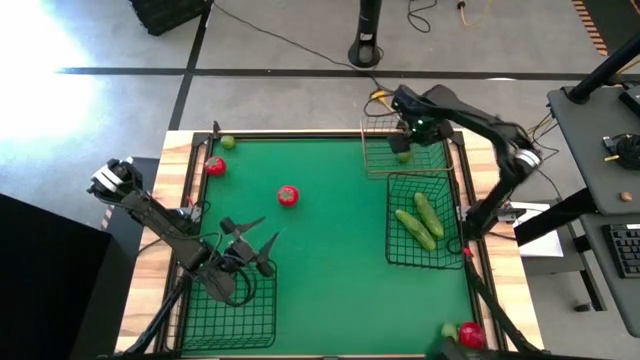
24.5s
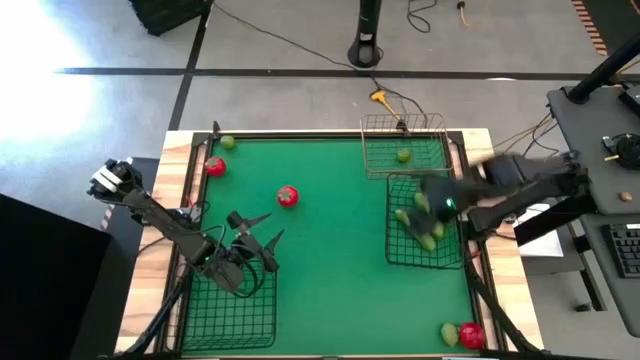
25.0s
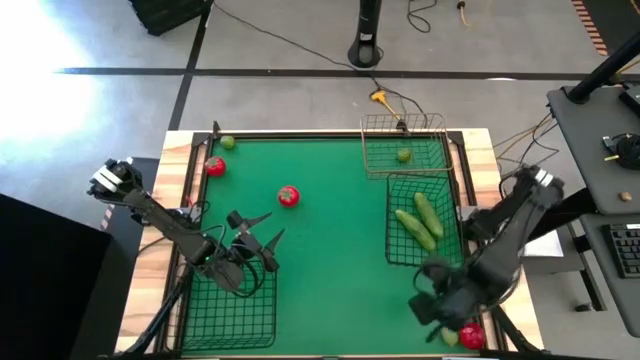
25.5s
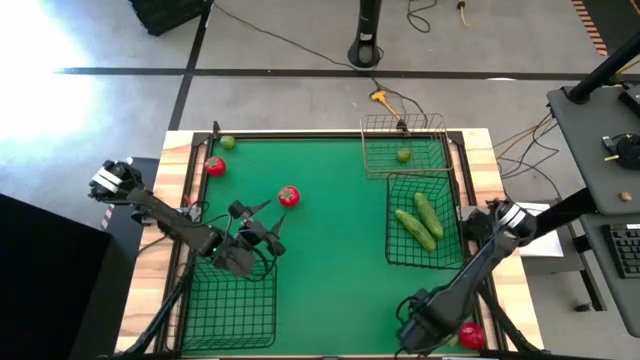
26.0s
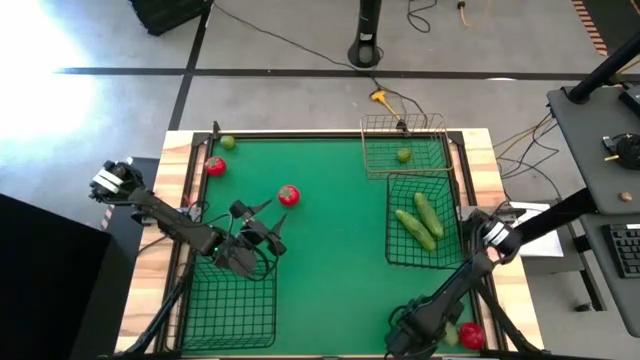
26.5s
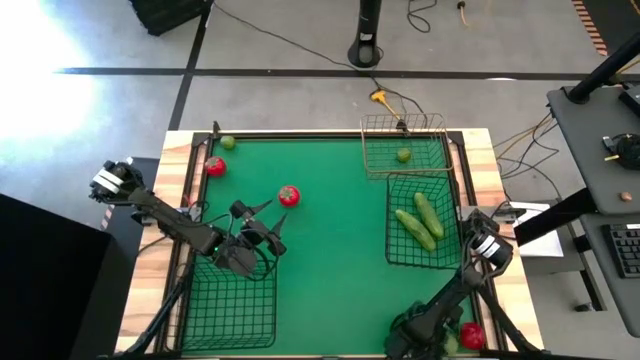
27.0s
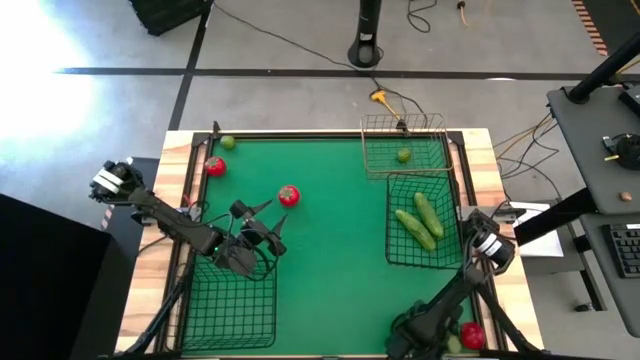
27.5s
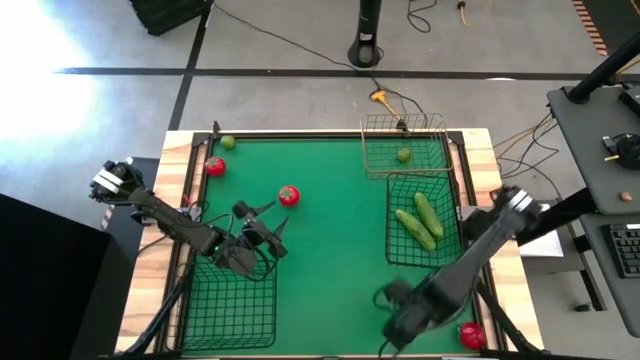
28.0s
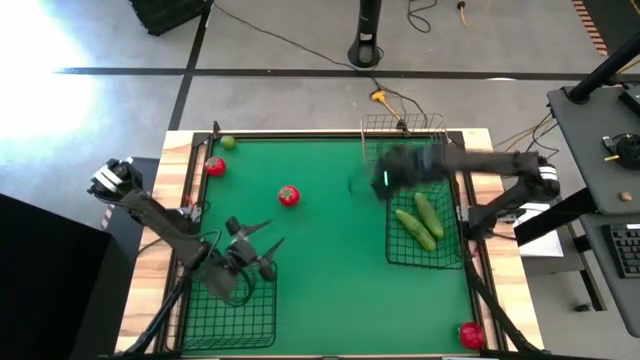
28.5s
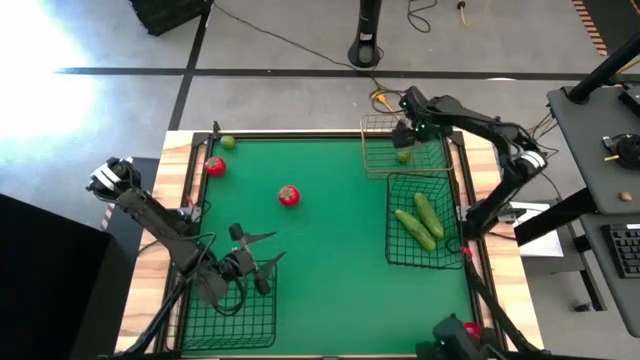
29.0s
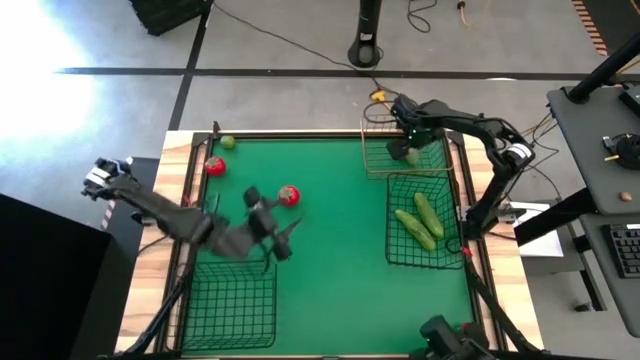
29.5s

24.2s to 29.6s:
Task: Sort produce into baskets
Put the bottom lime into the gold wire basket

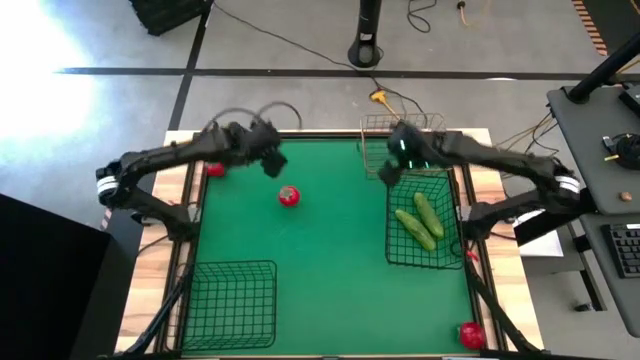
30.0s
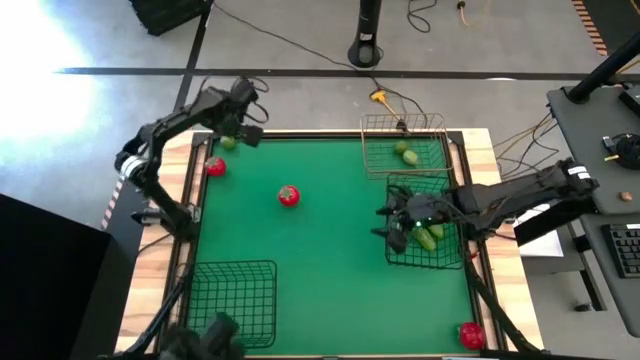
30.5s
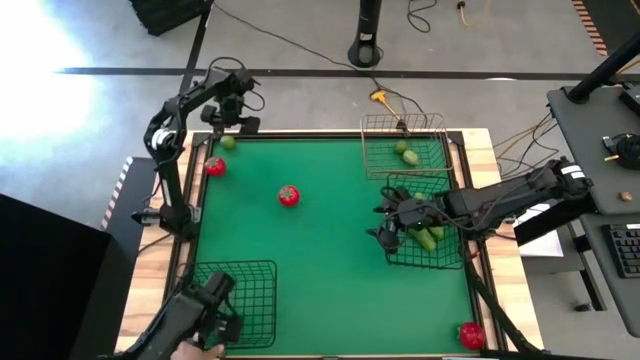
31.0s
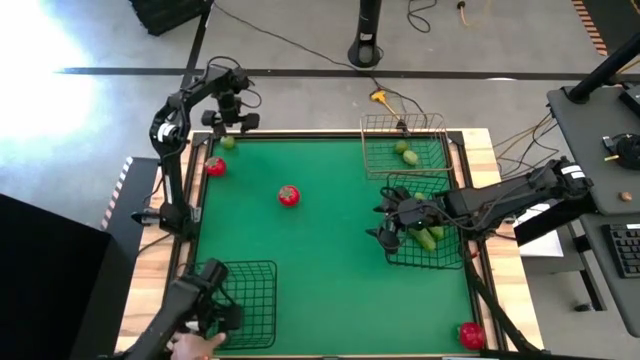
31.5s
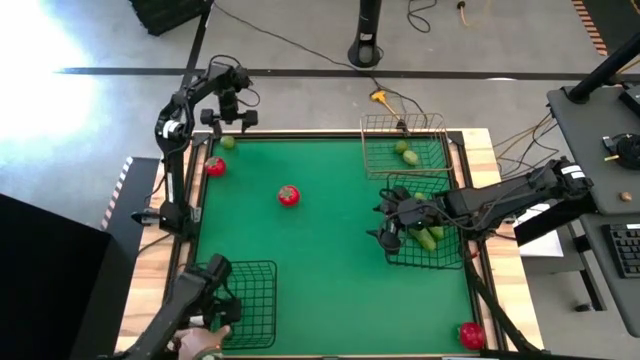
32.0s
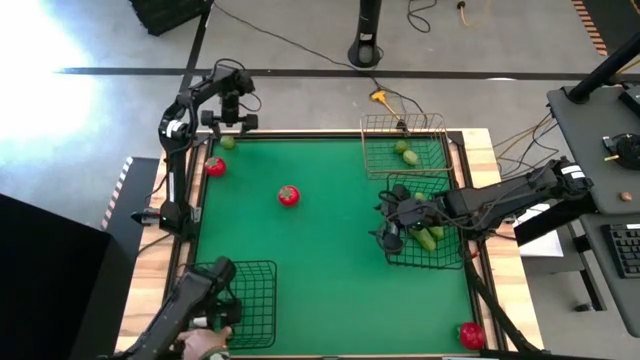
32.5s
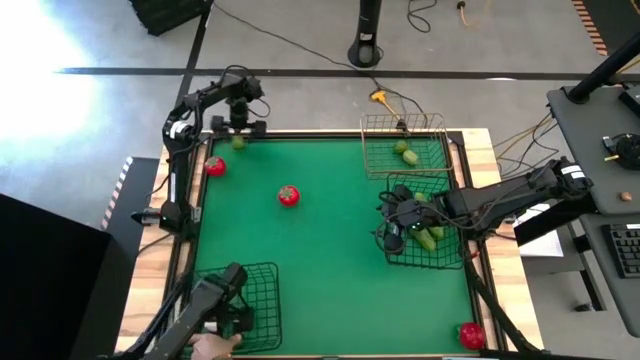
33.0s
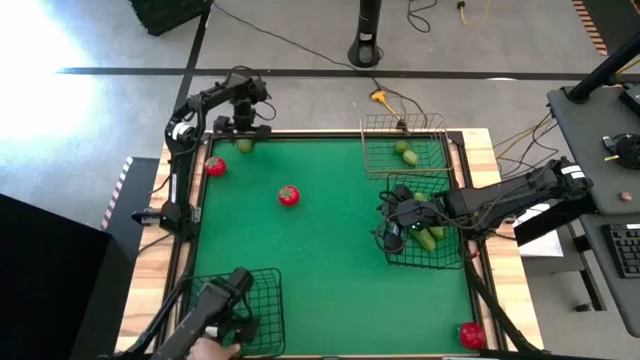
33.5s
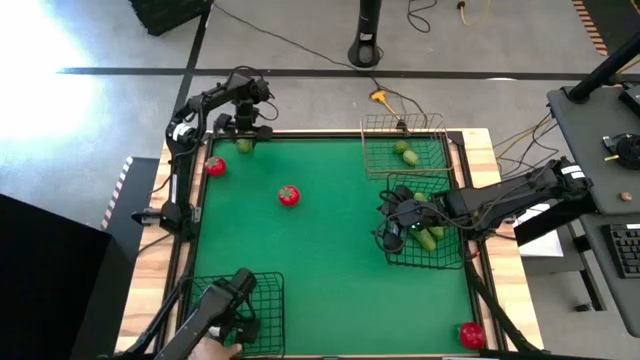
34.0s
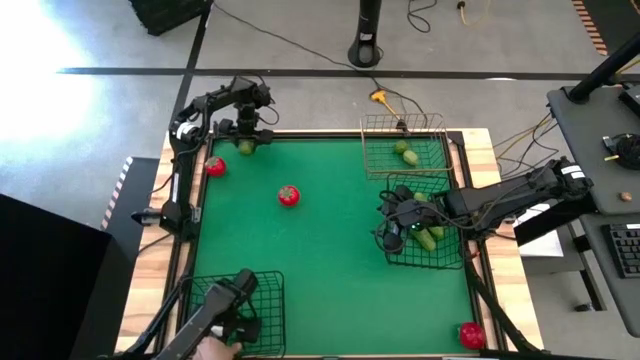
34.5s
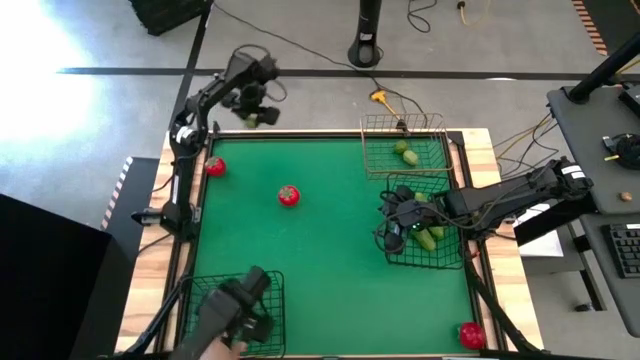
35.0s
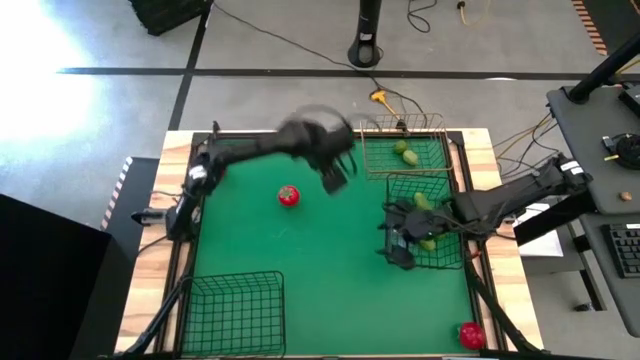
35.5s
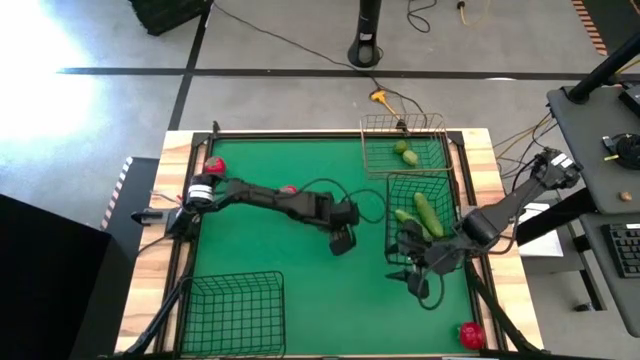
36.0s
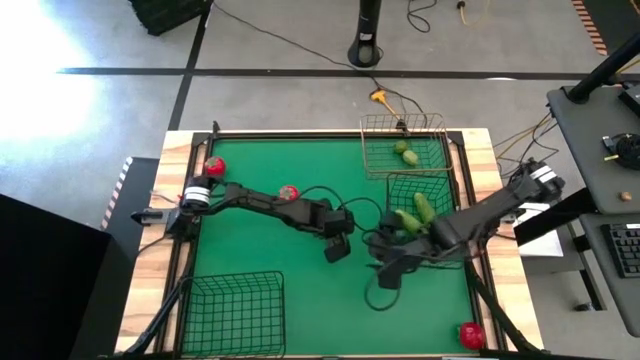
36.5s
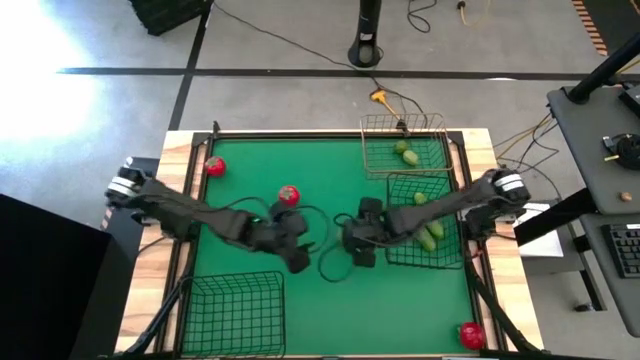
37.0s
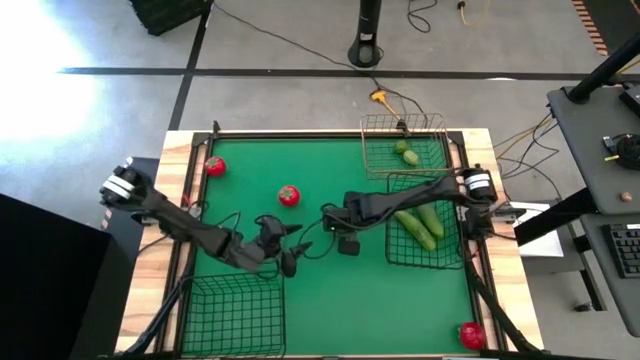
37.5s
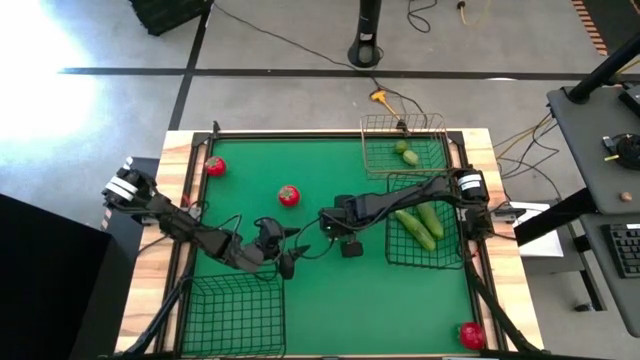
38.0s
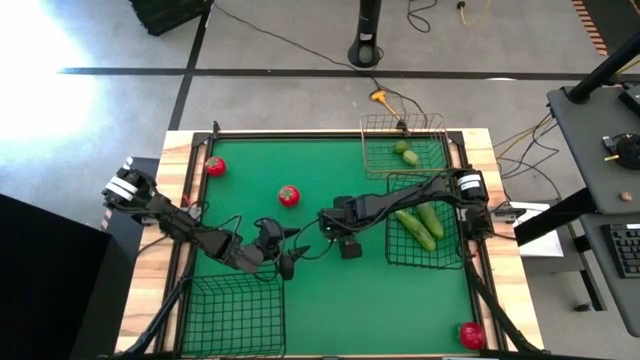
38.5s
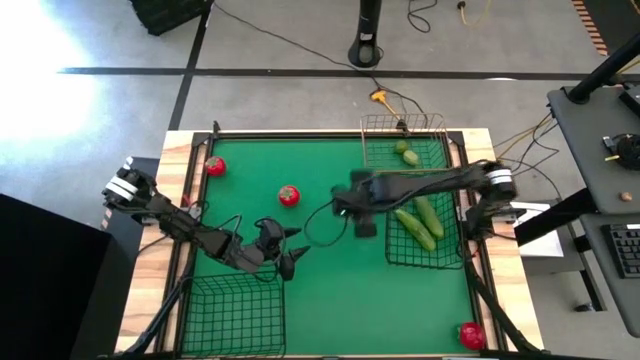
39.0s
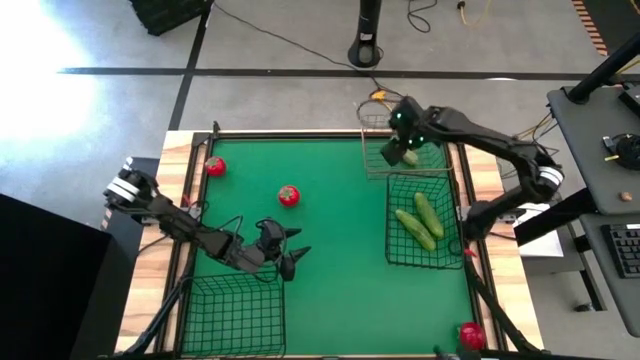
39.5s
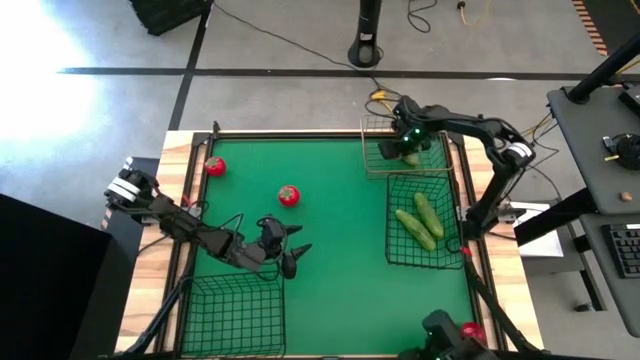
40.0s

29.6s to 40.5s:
Put the lime into the gold wire basket

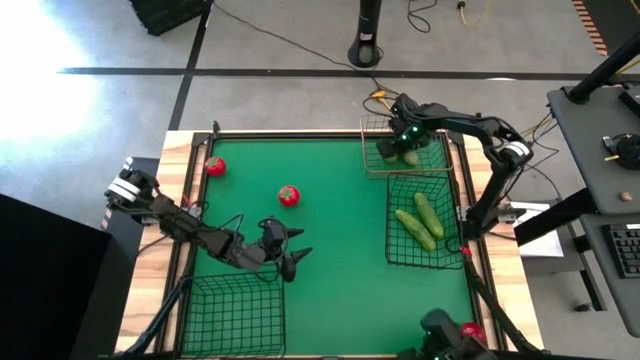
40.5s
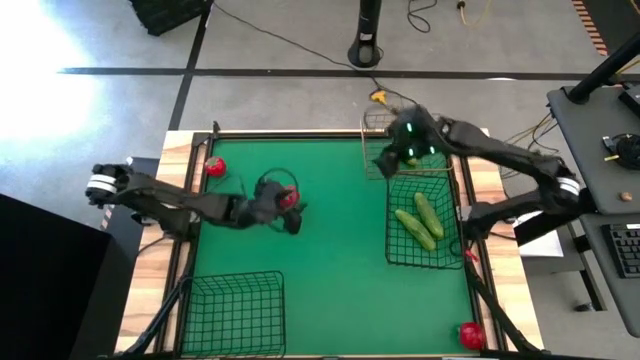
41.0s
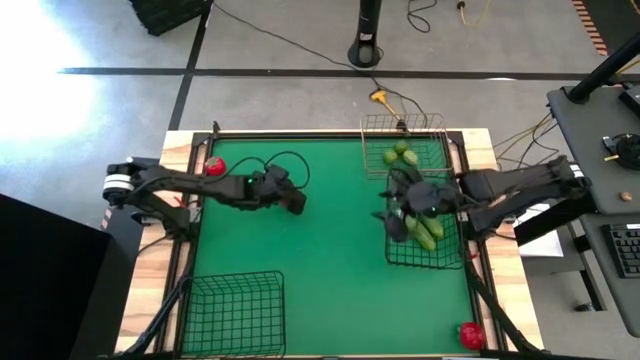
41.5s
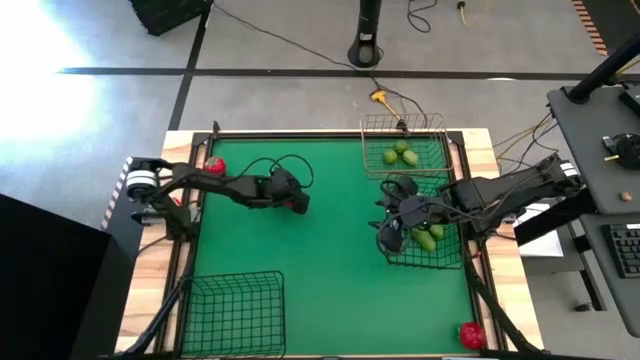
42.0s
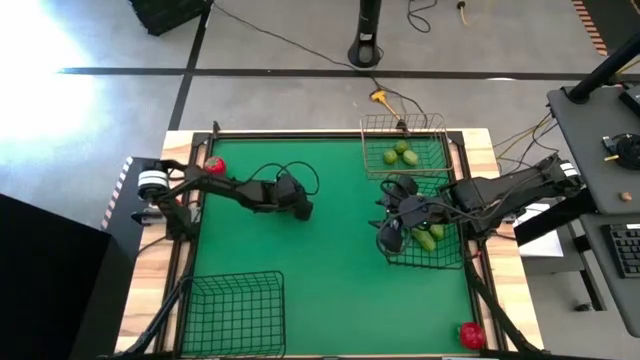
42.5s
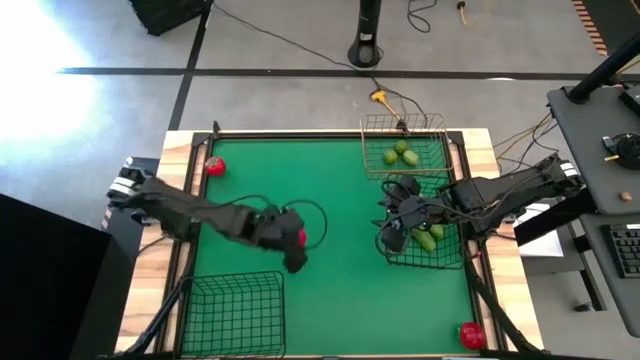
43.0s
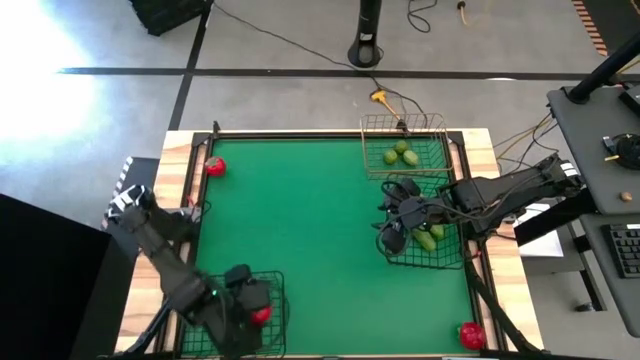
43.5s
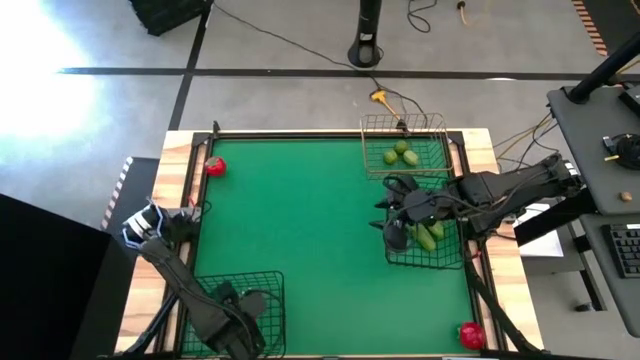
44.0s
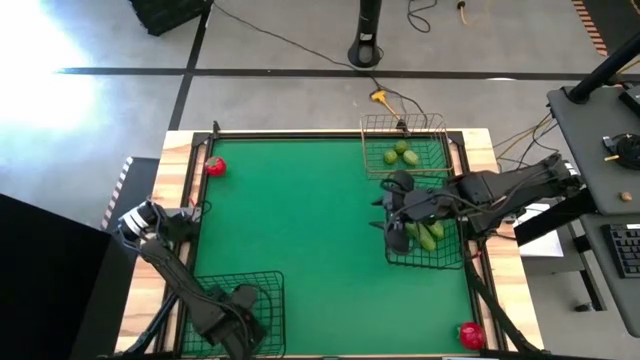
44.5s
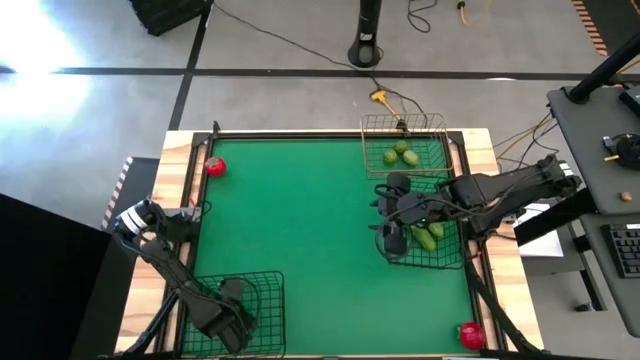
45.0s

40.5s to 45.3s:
Put the middle tomato into the bottom black wire basket
